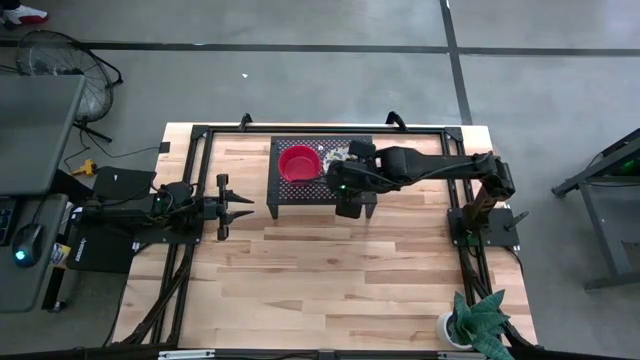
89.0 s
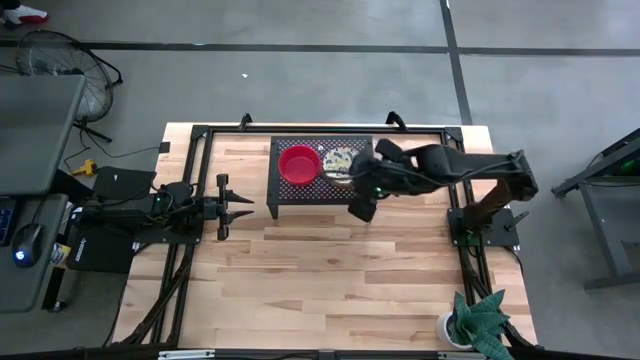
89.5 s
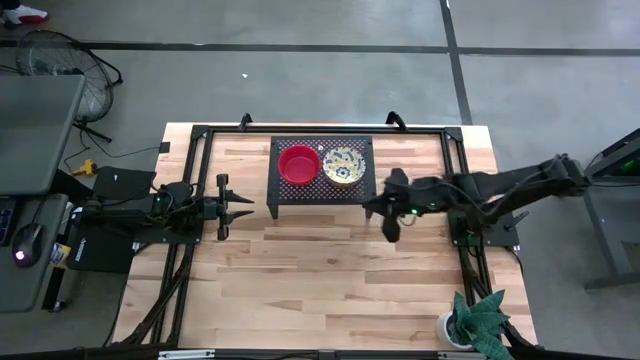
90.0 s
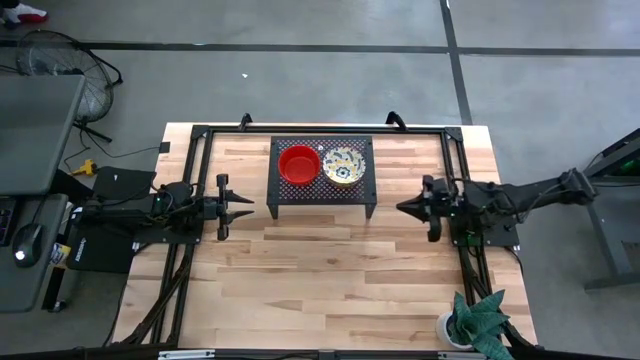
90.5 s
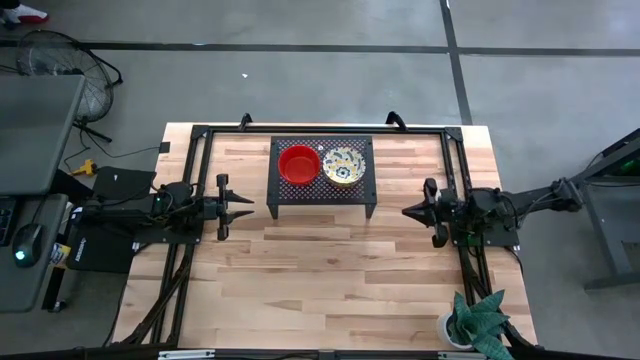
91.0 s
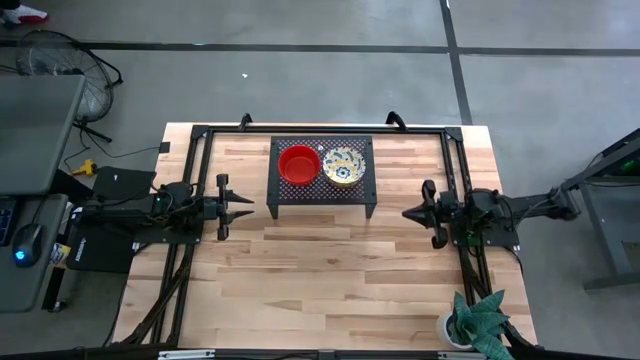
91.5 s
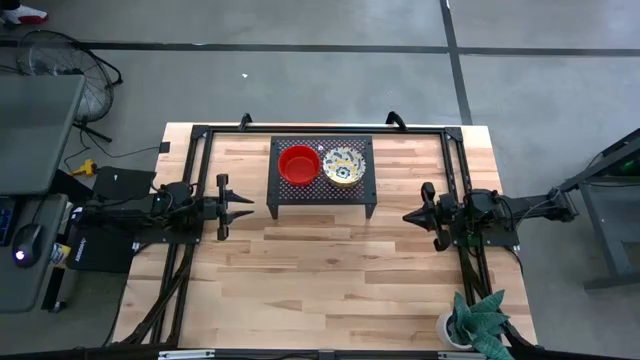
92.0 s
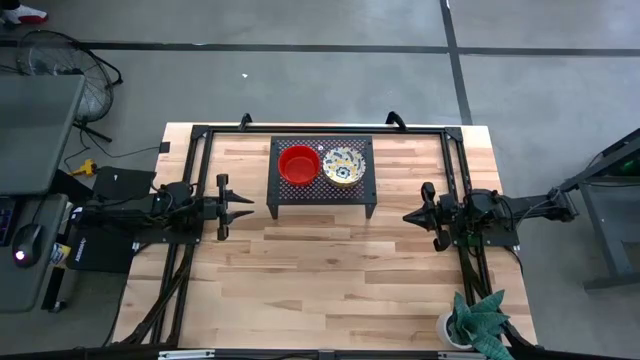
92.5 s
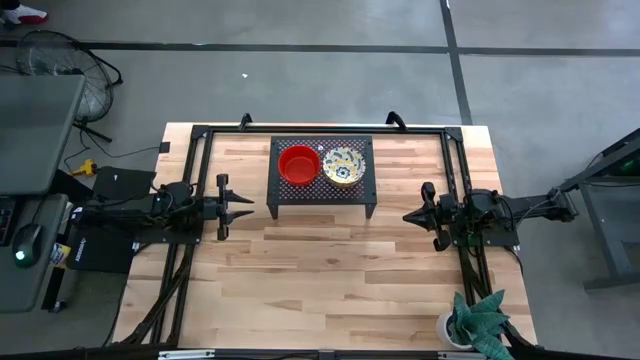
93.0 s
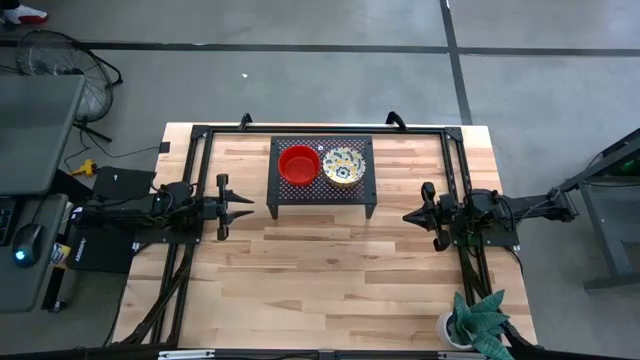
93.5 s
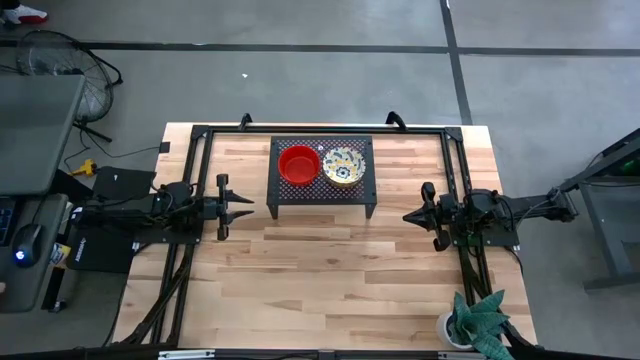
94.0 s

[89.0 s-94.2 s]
Task: Pick & Place Mini bowls
Return to Home Position

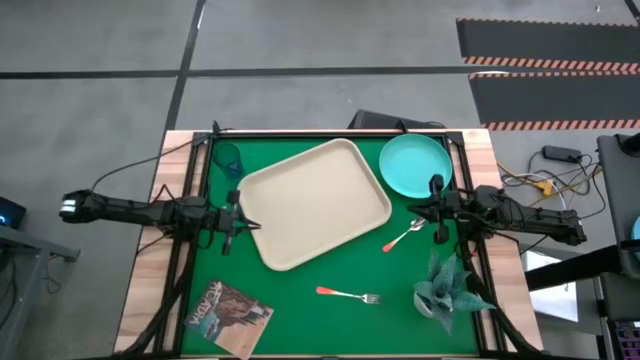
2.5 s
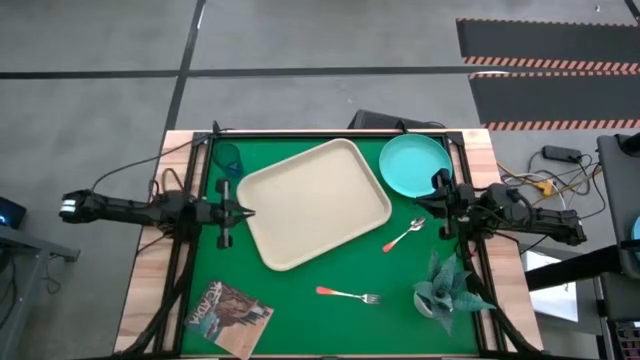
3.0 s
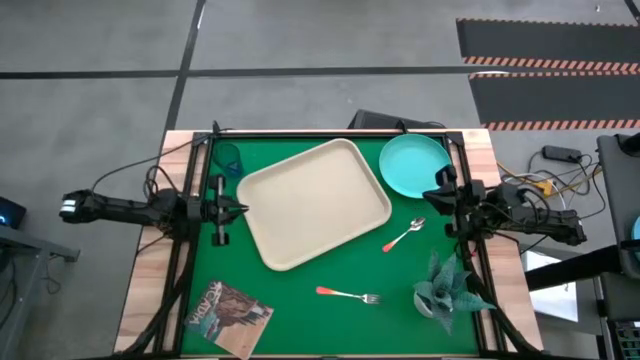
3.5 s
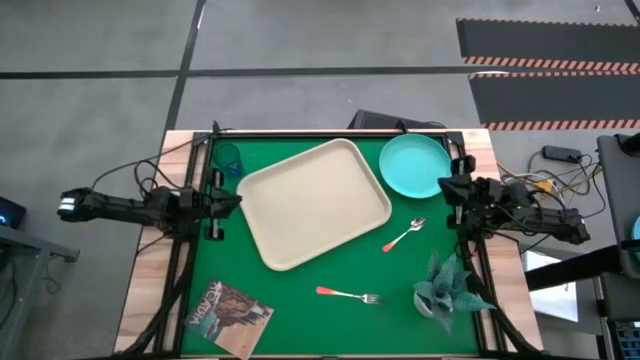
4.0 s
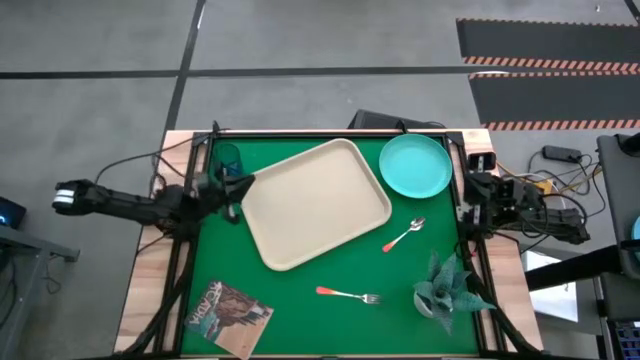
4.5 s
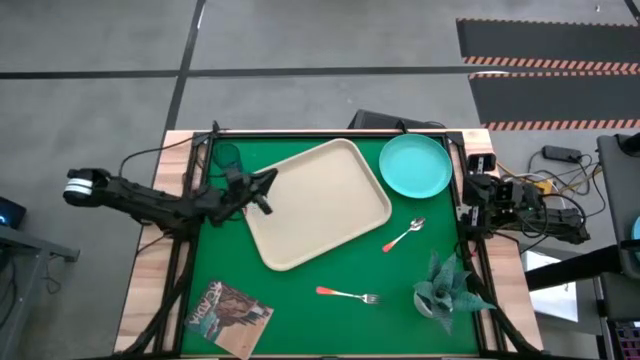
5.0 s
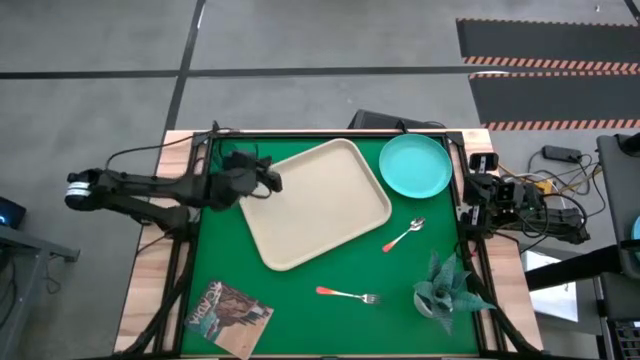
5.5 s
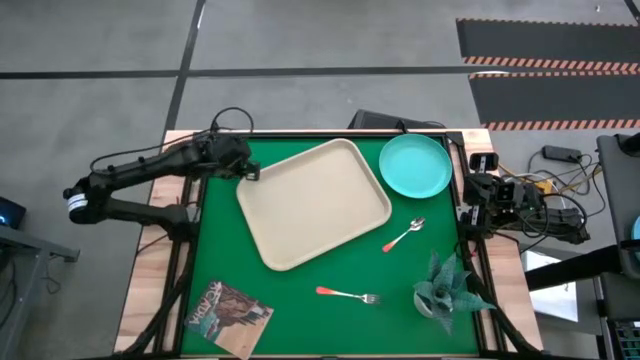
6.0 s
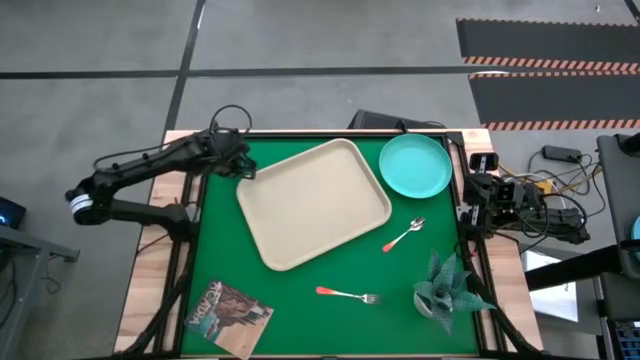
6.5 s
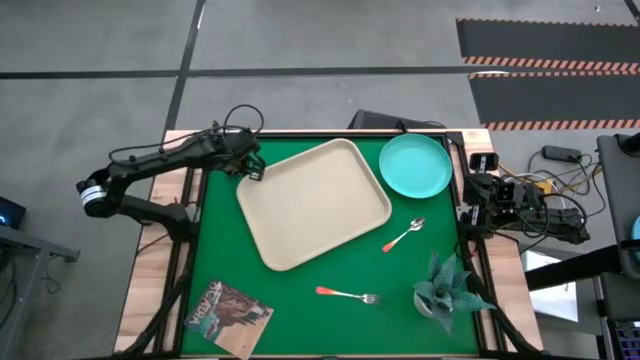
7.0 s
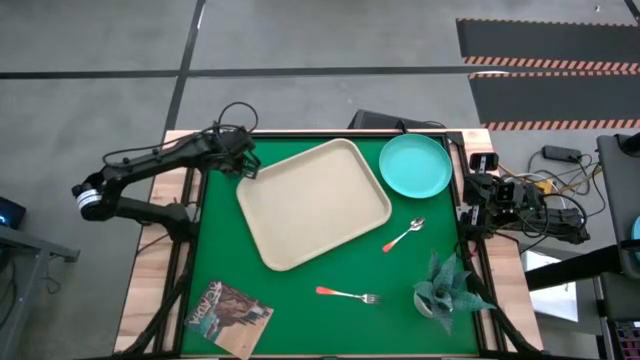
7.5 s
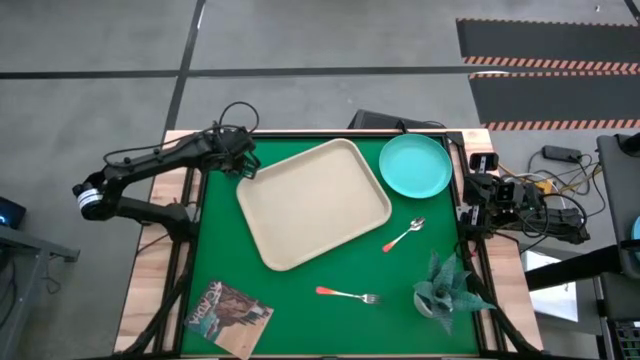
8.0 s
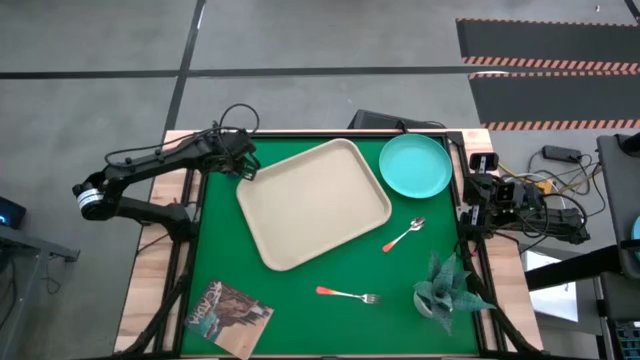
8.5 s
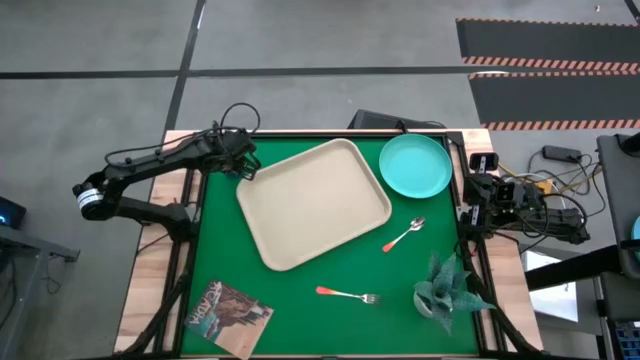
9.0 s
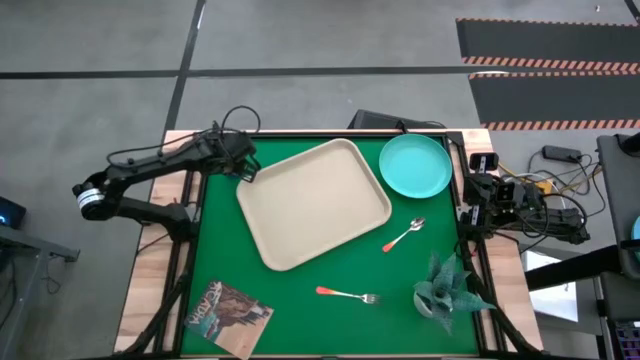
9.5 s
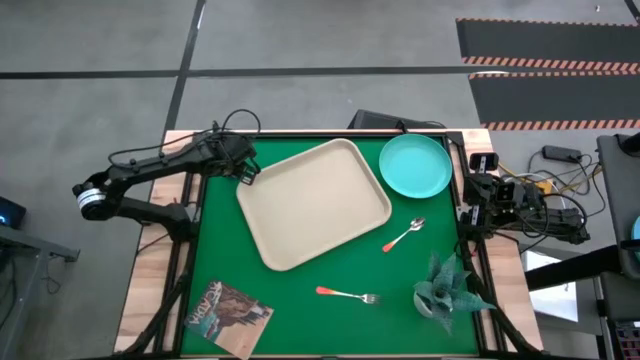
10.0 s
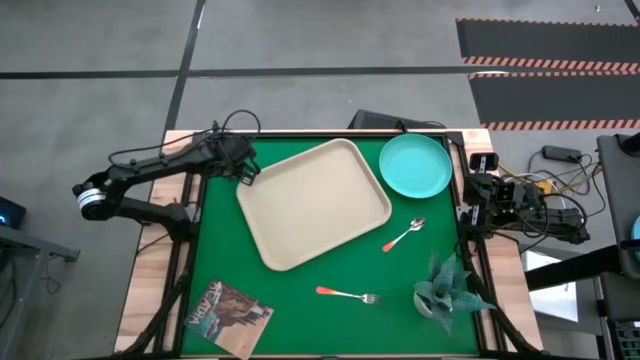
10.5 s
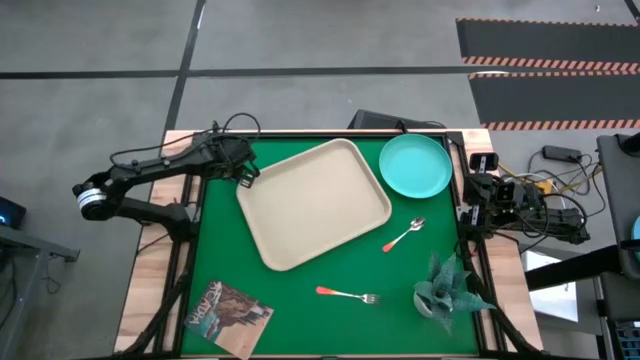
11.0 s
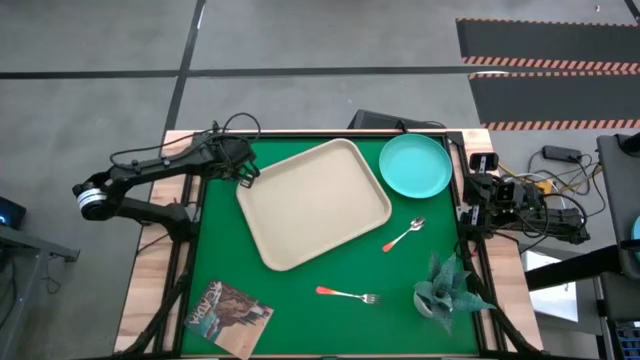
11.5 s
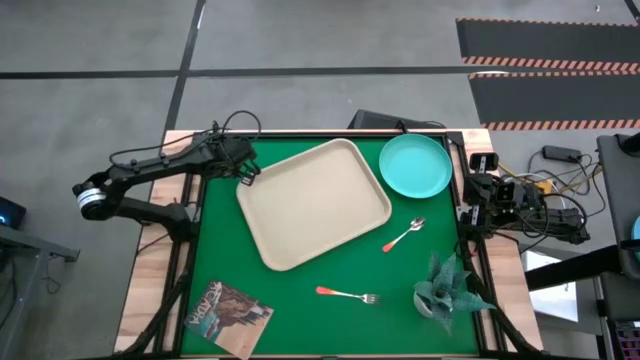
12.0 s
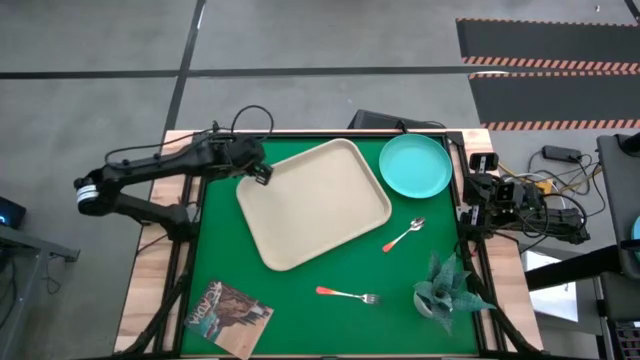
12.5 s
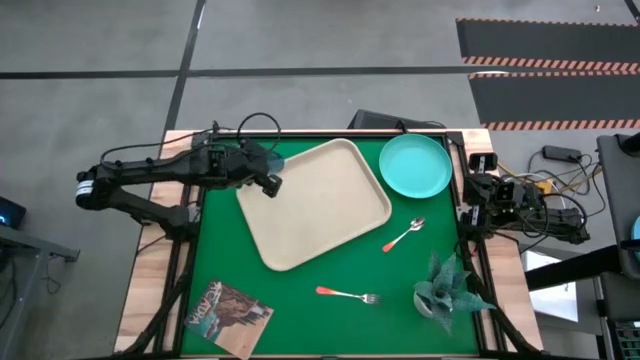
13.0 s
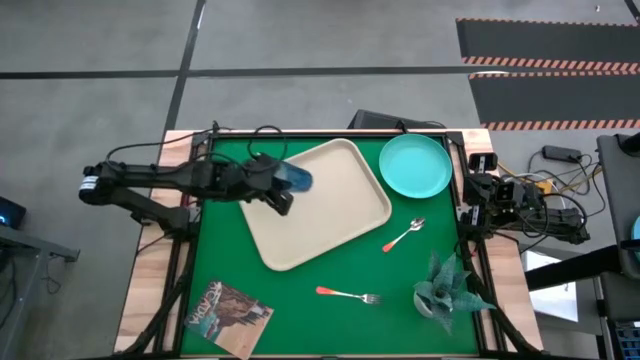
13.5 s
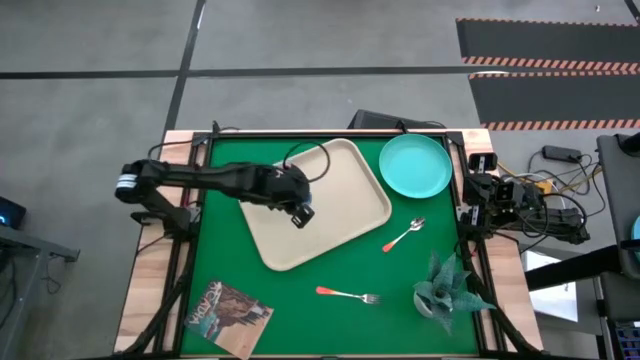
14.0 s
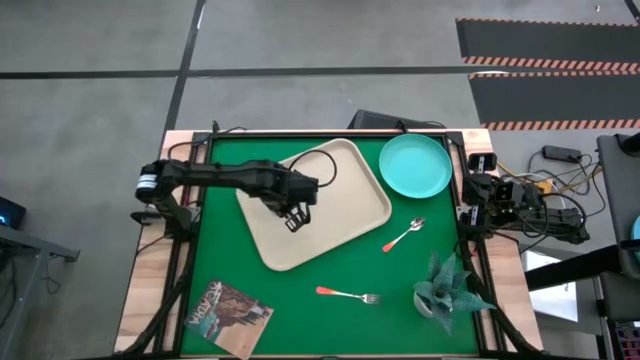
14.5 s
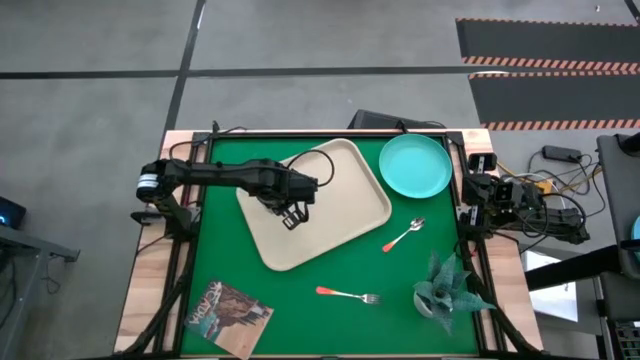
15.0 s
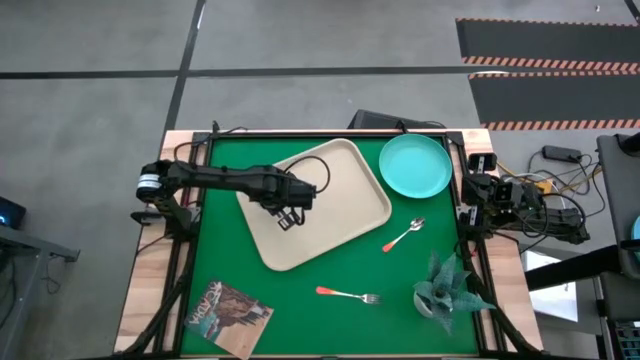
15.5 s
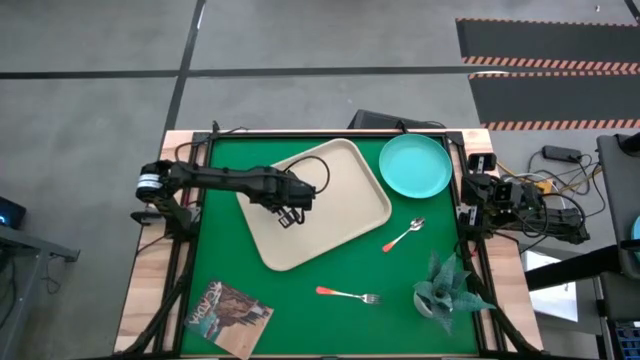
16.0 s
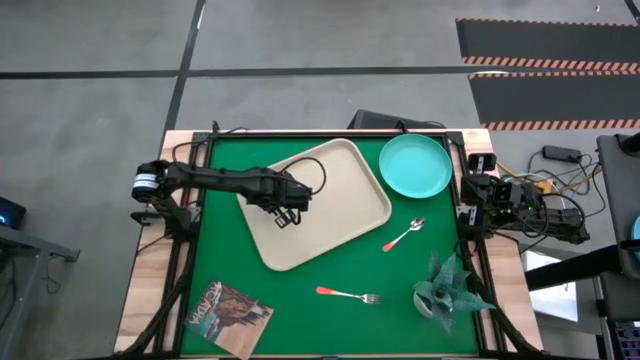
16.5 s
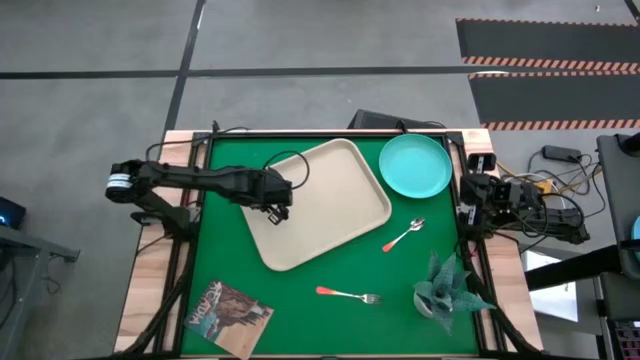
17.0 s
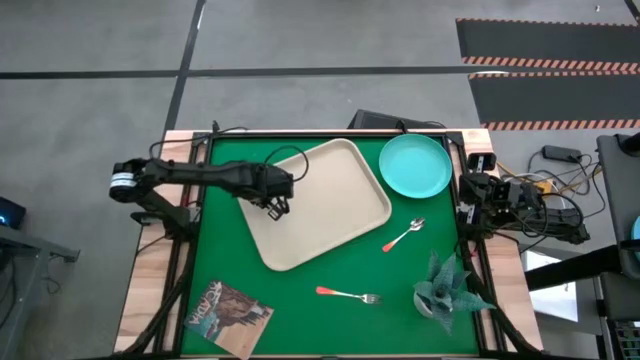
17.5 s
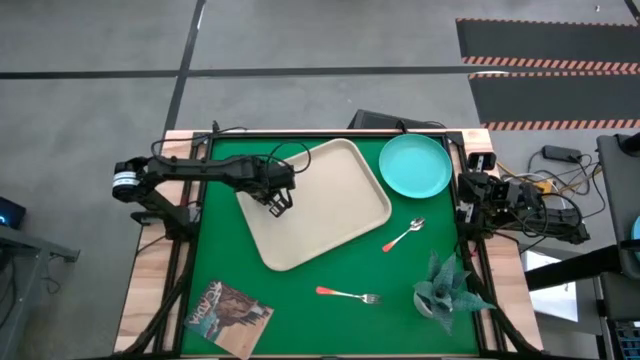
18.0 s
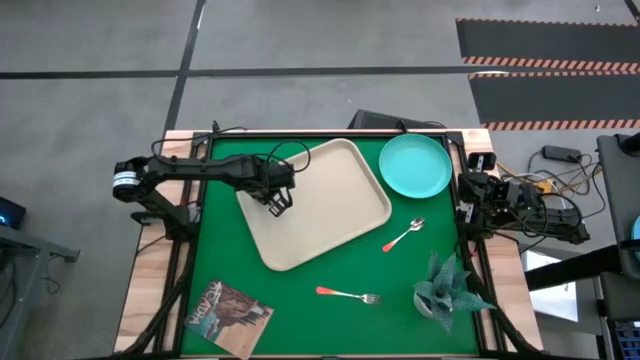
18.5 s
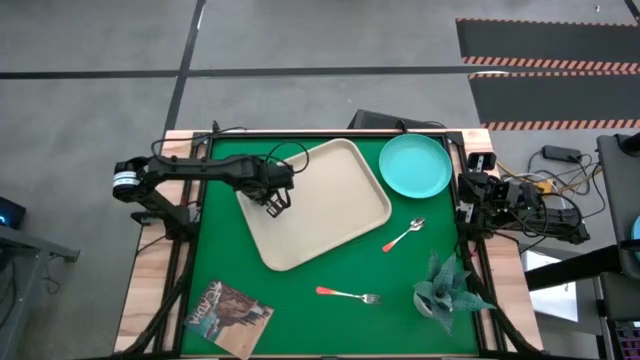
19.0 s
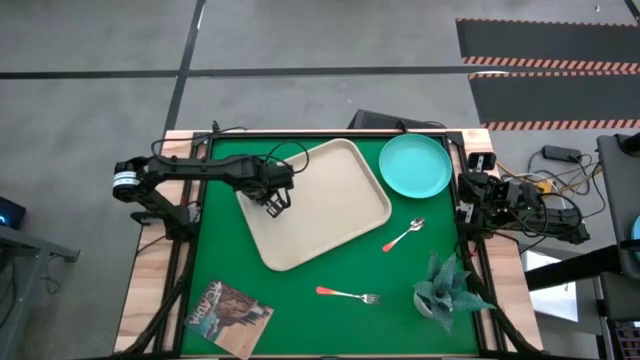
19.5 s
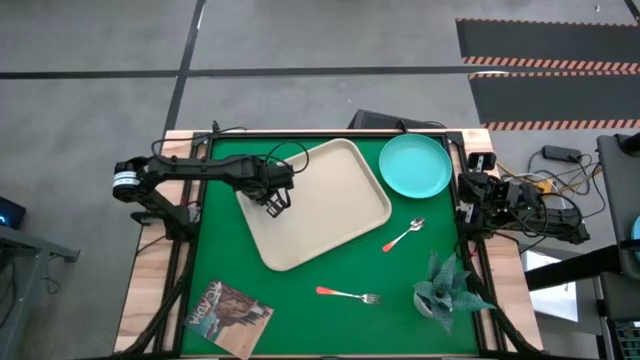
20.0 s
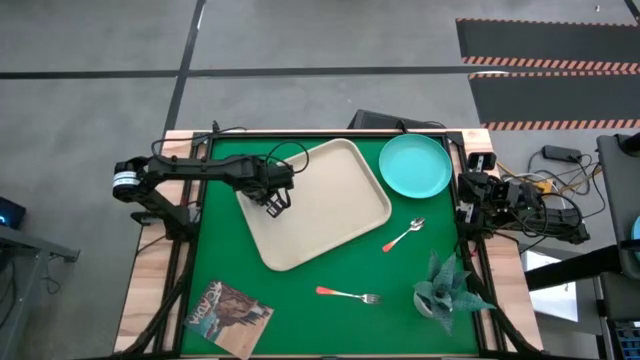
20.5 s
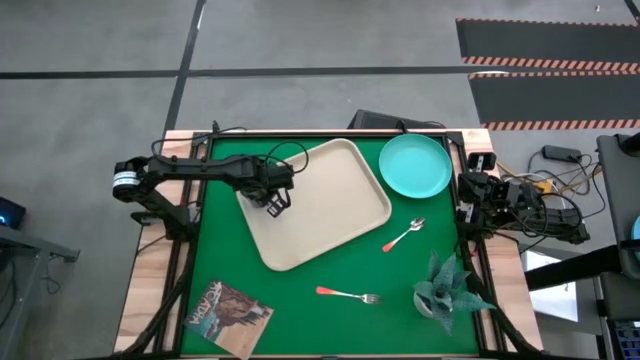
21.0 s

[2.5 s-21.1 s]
Task: Pick and place plate/cup/fork/spoon on tray
Put the blue glass cup on the white tray
